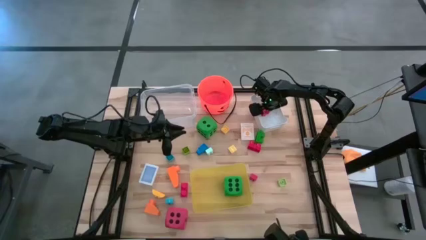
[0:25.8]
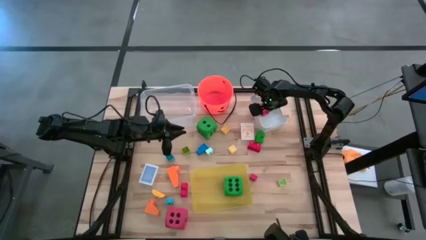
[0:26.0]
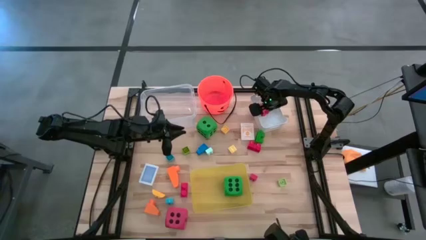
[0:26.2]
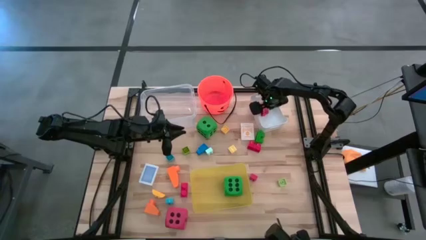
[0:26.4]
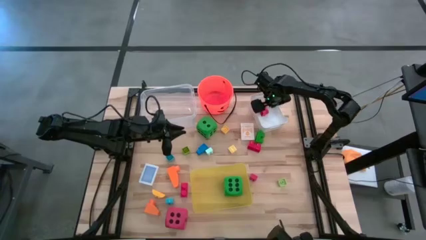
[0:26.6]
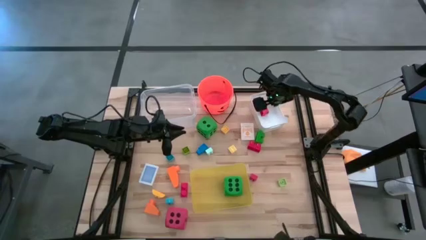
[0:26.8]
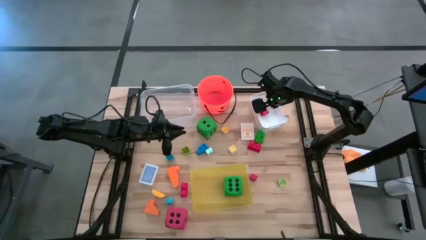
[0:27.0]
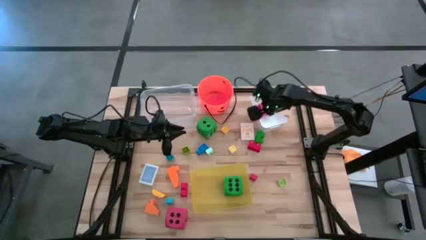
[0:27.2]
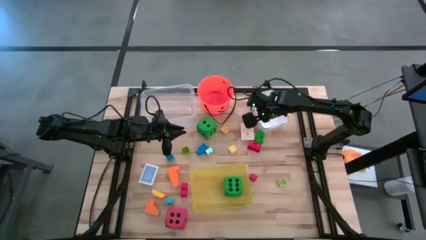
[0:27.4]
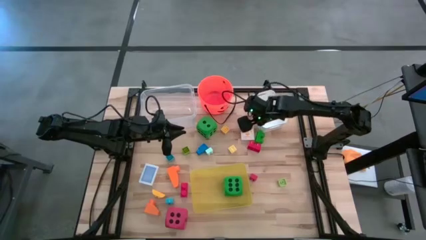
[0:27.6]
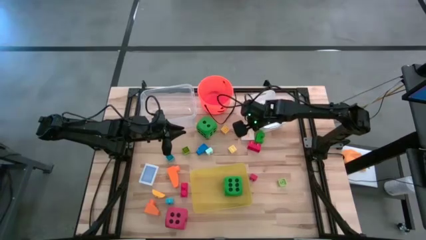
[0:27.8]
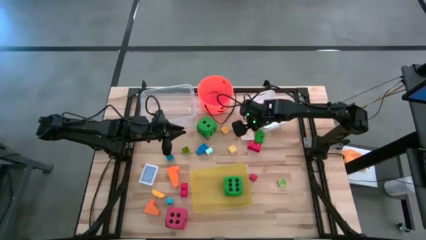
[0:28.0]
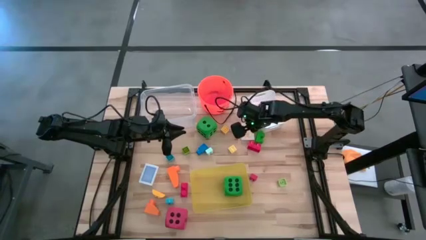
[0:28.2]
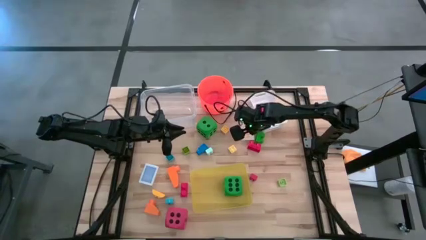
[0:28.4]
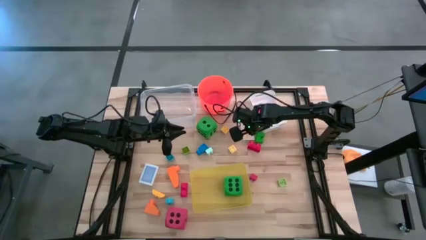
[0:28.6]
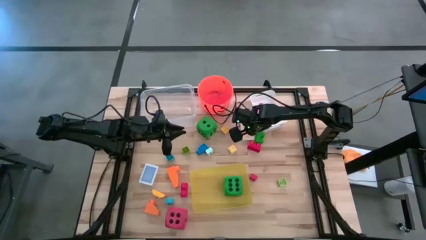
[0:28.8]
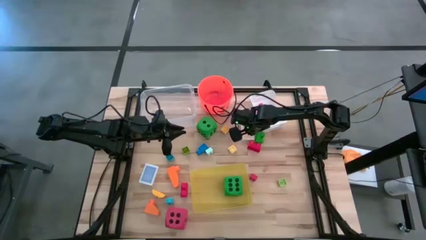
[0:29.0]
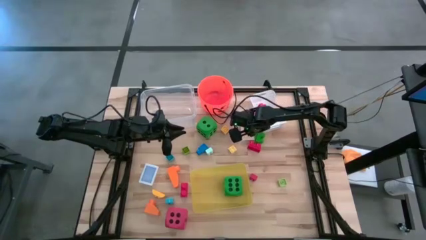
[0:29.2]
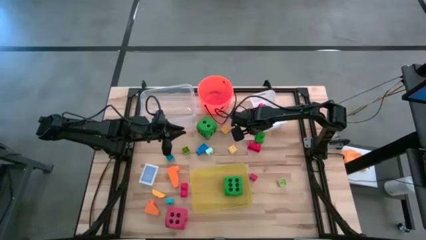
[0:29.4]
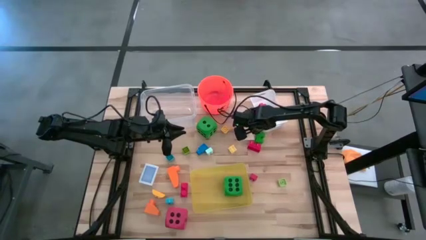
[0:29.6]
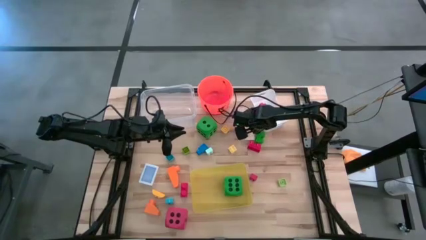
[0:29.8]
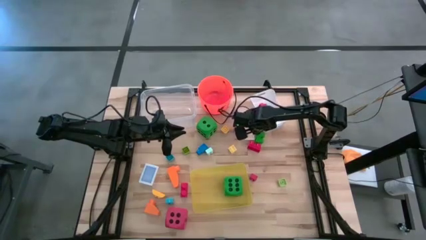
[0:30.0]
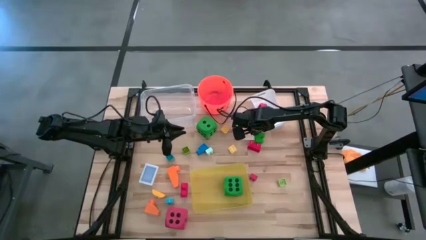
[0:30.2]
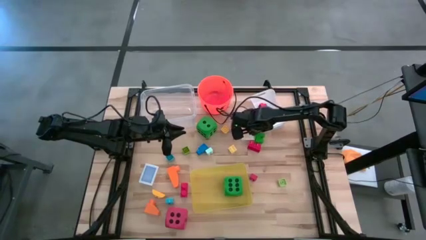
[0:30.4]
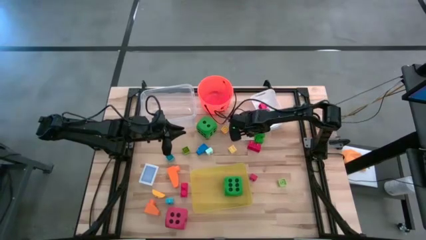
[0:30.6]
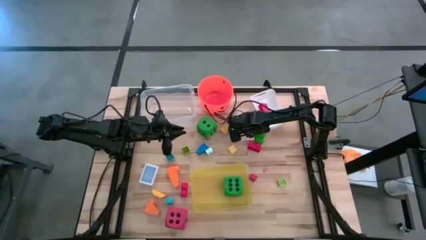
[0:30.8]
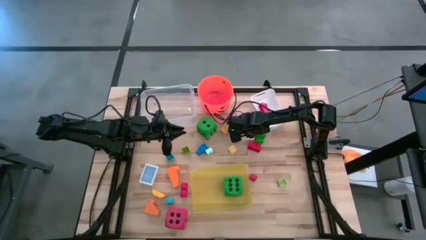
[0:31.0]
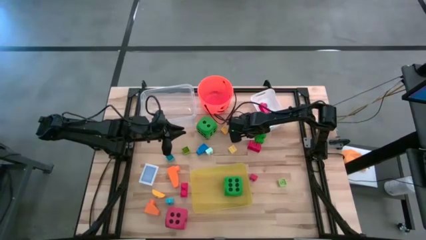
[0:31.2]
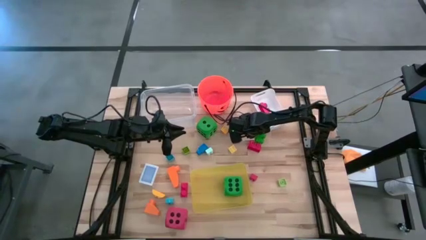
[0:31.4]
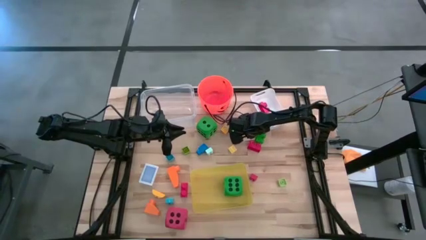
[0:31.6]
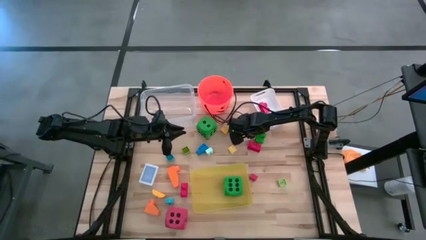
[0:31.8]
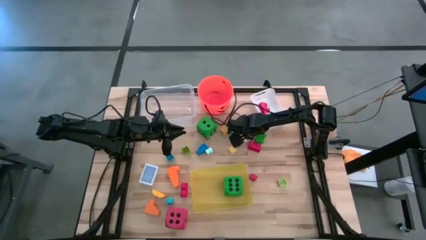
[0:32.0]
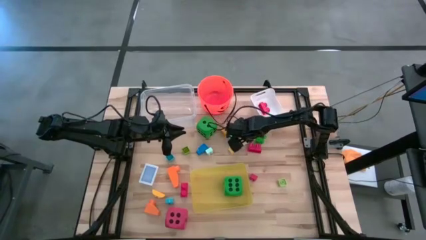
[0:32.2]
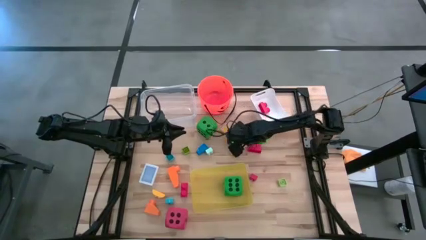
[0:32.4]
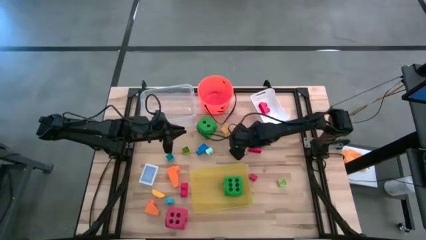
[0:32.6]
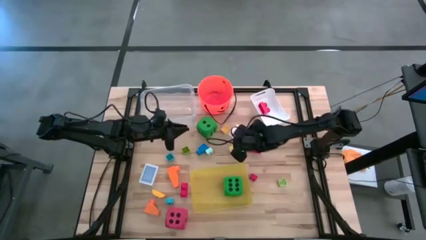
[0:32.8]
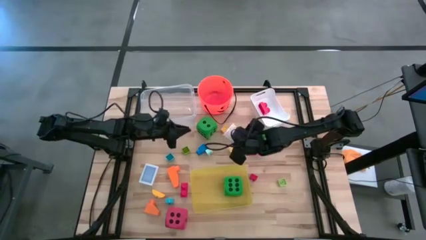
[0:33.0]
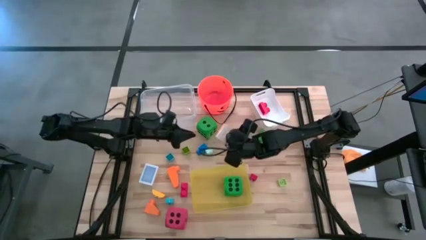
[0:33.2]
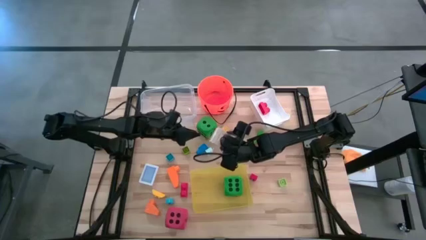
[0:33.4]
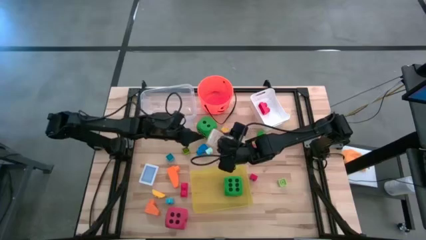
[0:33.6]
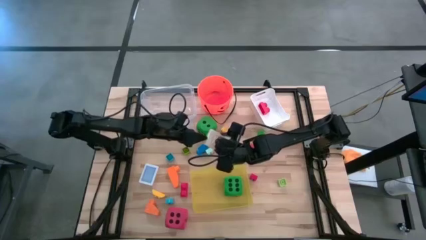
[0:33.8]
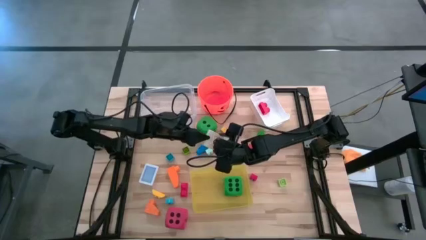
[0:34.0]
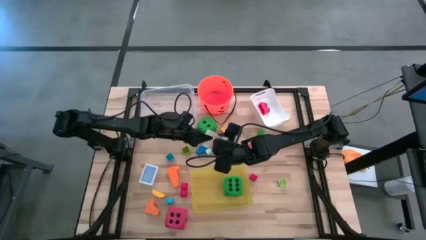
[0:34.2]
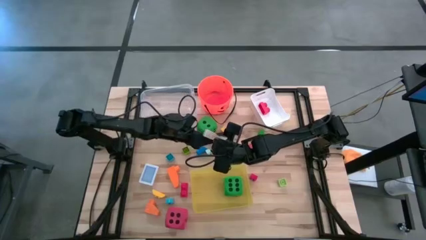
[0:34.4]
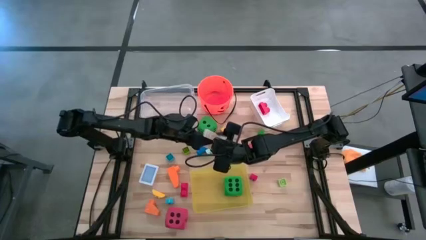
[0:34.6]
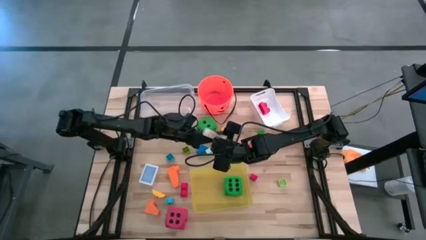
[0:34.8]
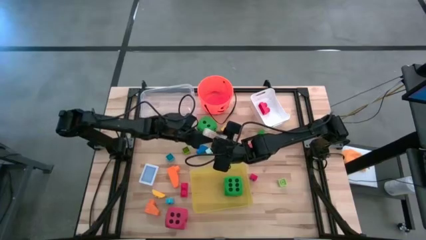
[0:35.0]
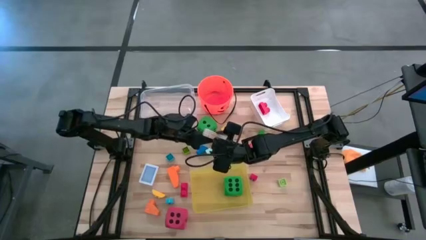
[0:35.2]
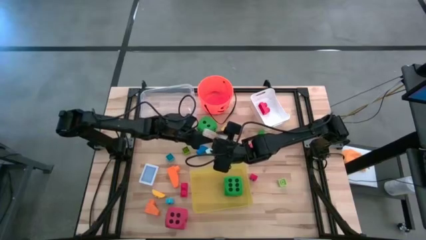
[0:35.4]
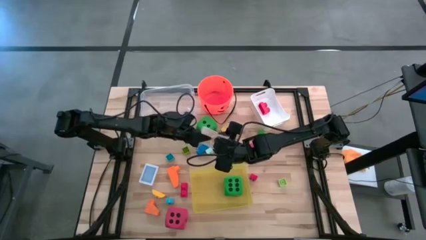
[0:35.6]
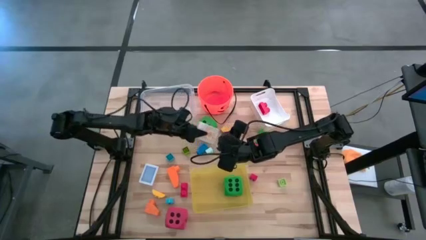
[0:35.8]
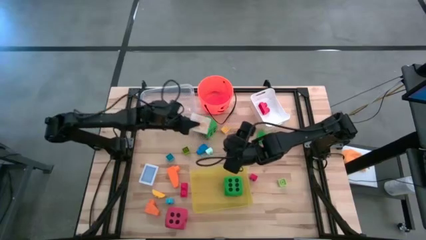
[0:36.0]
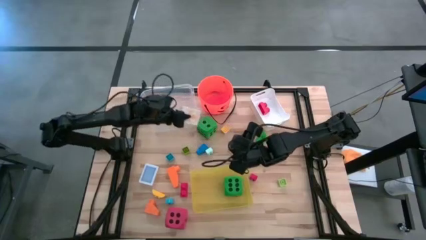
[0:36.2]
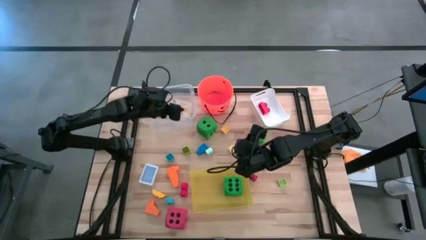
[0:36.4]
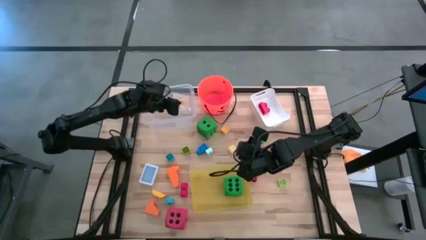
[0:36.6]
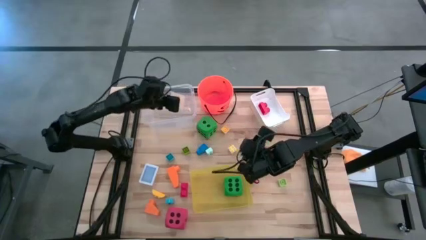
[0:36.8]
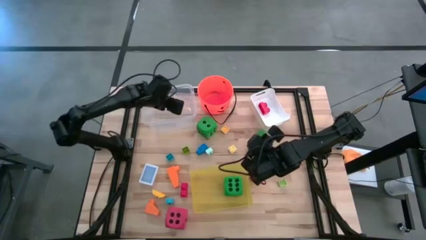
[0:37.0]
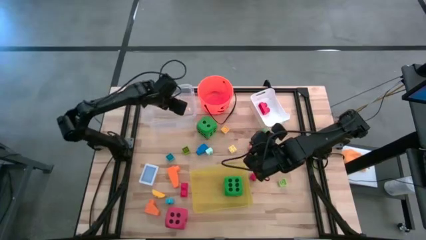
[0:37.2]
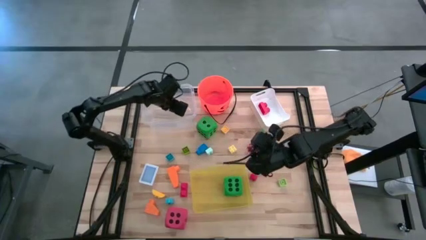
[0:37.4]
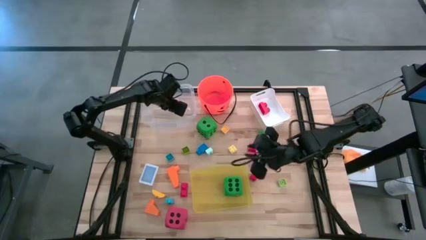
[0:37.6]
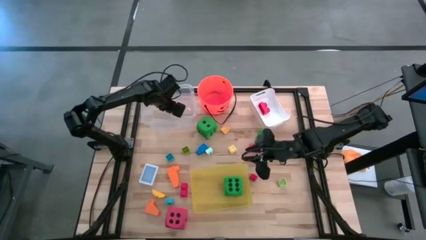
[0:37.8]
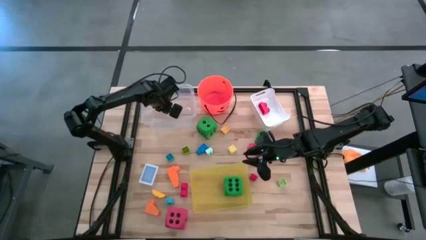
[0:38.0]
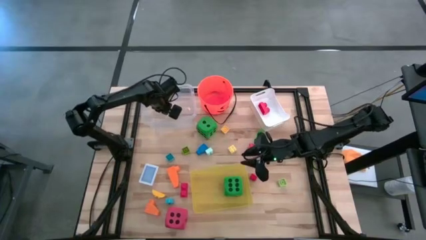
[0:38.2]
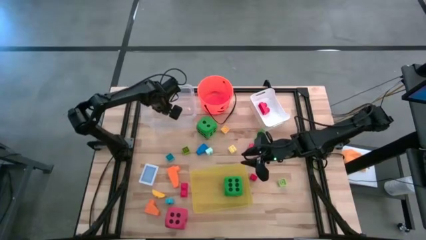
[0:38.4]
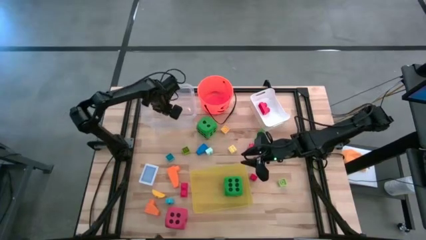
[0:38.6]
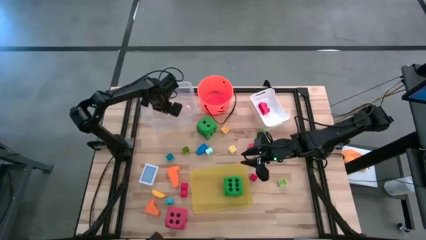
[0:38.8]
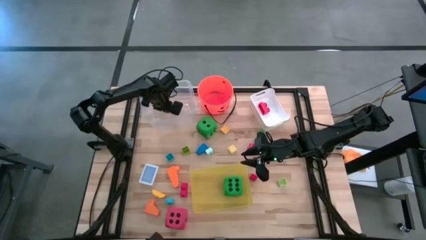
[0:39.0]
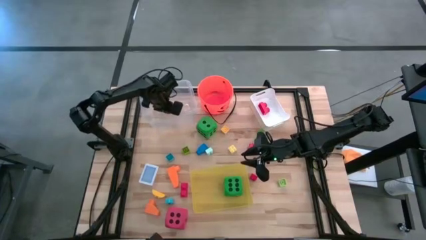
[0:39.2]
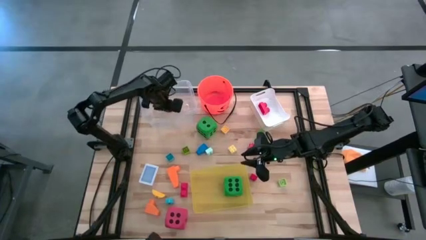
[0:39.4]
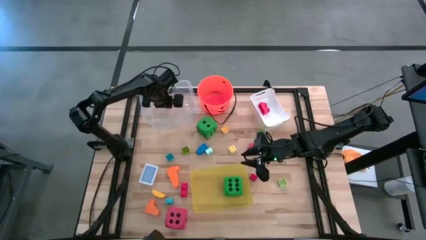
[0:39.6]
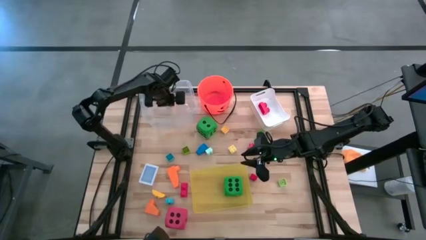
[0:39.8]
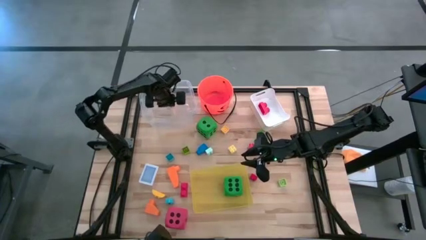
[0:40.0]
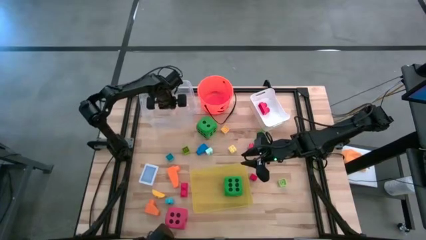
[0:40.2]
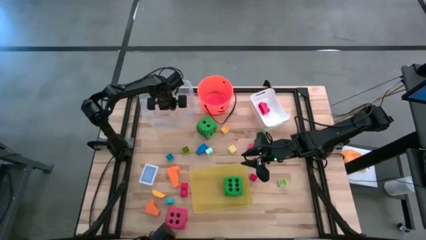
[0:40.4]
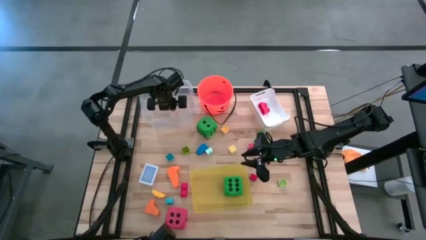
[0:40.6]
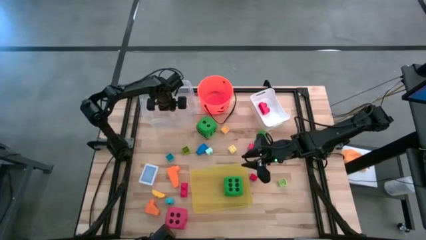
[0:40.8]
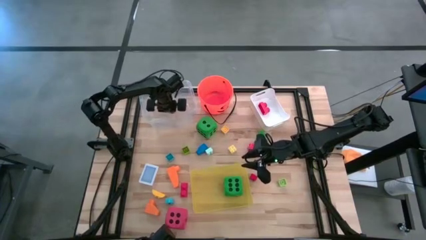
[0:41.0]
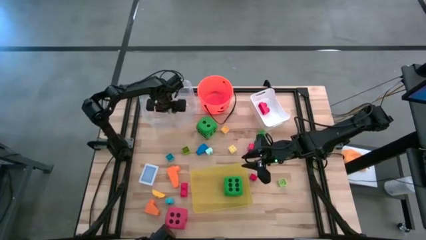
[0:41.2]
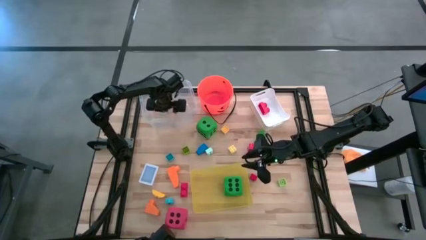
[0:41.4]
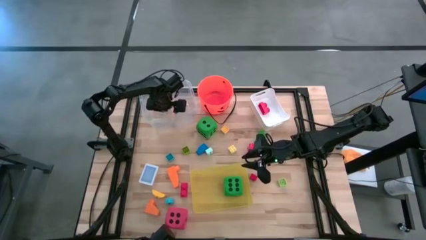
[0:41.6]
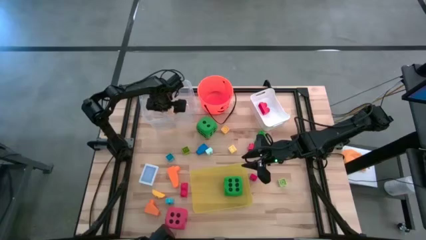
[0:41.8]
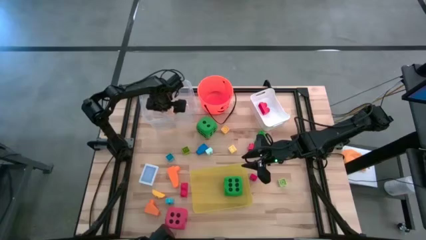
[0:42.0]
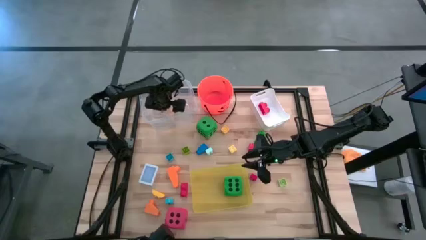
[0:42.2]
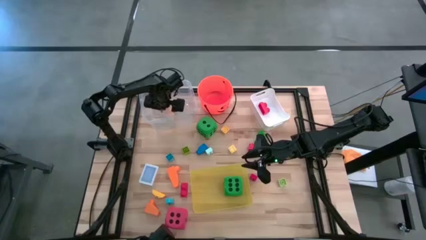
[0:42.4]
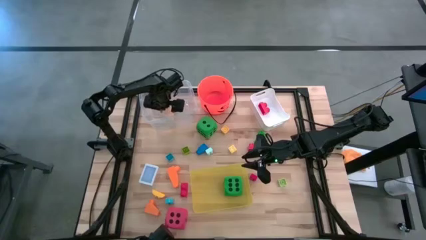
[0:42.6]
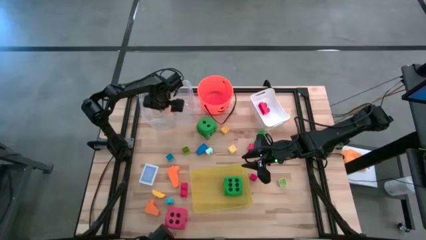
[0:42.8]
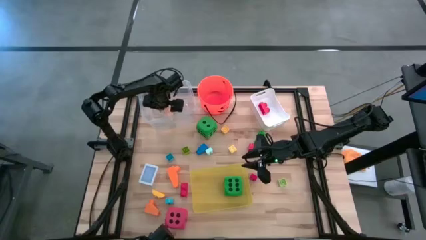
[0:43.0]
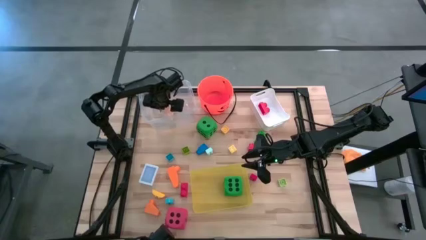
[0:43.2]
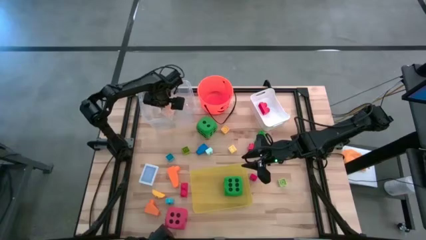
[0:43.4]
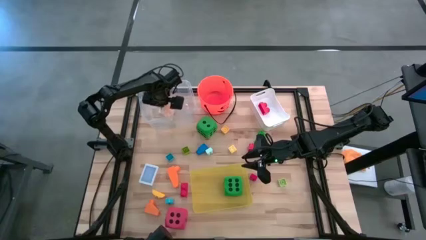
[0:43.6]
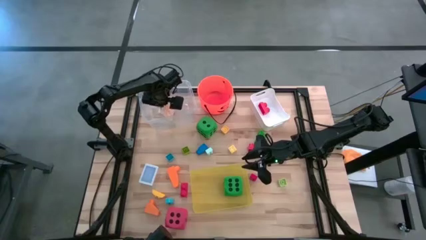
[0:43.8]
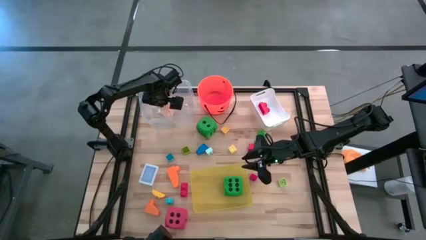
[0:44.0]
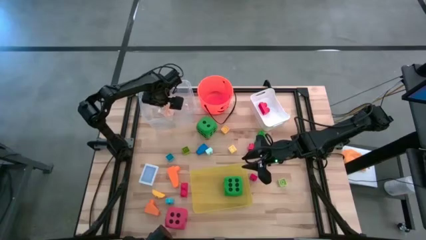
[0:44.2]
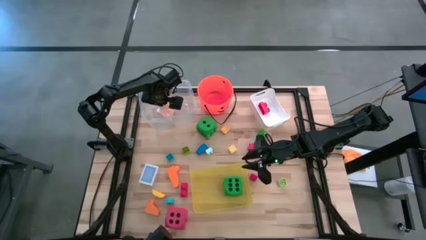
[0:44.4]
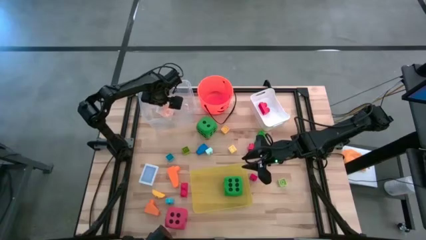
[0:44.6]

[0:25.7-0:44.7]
Task: Pick & Place Toys
Put the orange playing card box into the transparent bin
